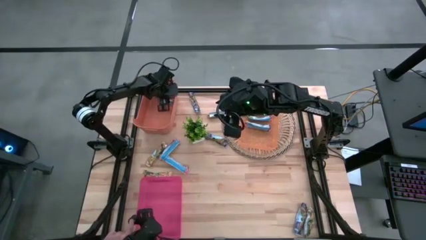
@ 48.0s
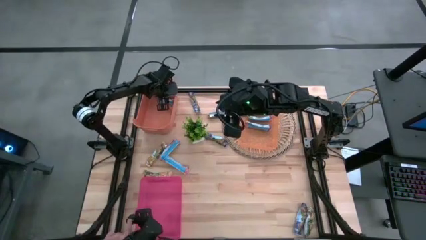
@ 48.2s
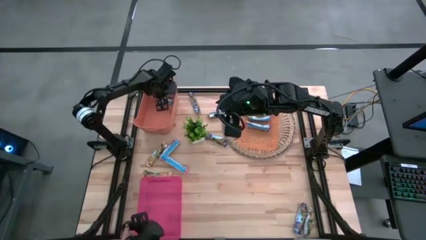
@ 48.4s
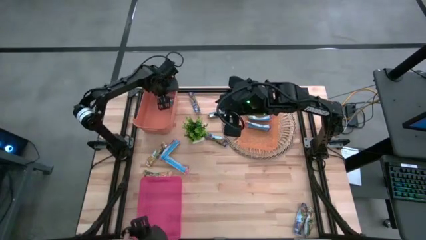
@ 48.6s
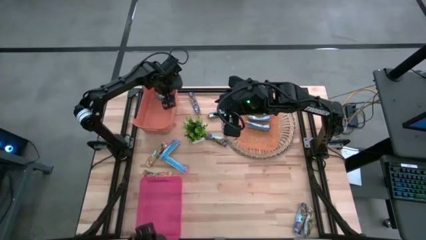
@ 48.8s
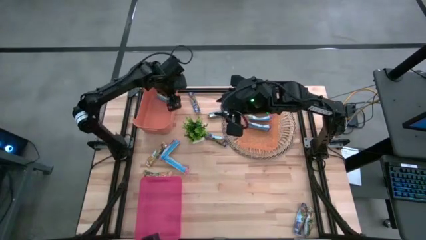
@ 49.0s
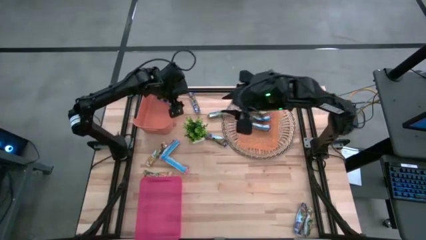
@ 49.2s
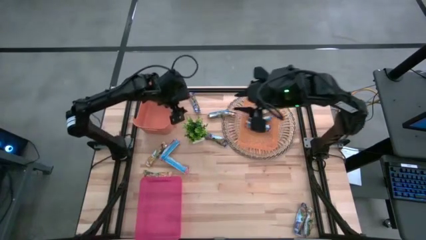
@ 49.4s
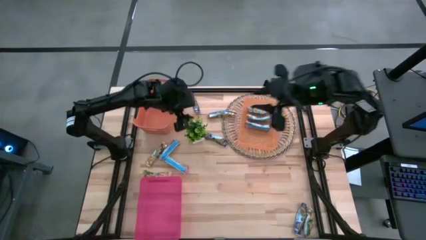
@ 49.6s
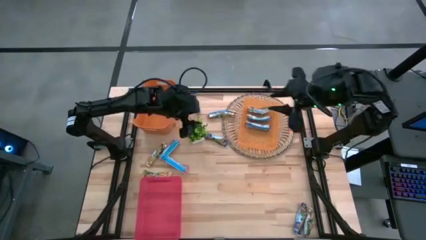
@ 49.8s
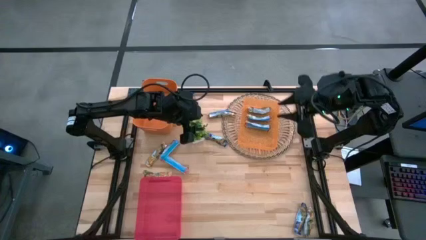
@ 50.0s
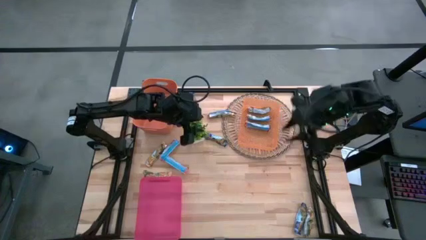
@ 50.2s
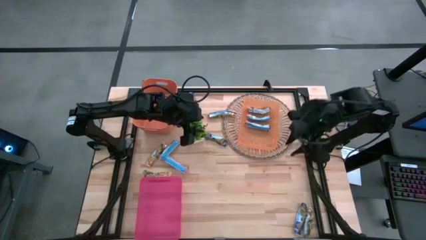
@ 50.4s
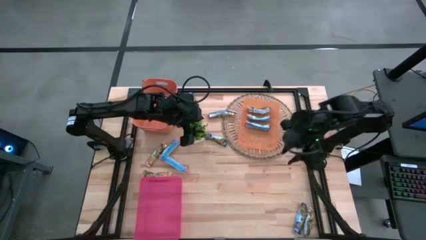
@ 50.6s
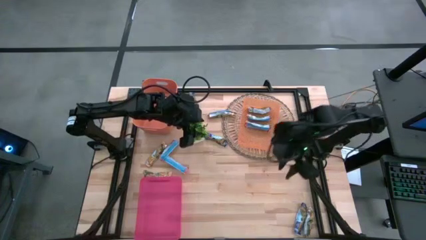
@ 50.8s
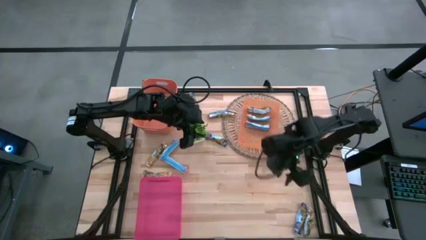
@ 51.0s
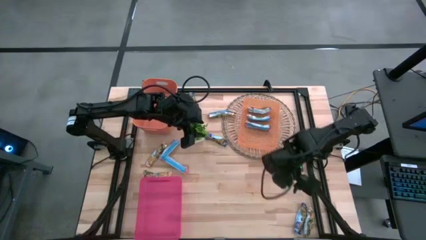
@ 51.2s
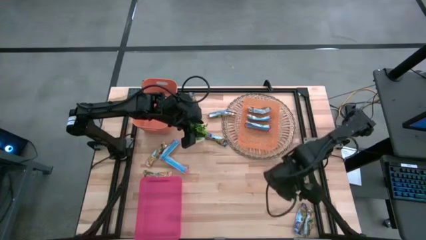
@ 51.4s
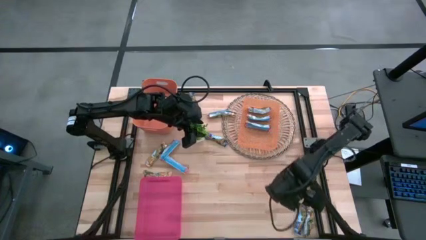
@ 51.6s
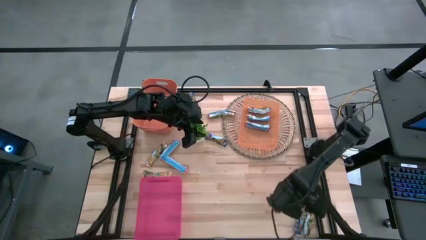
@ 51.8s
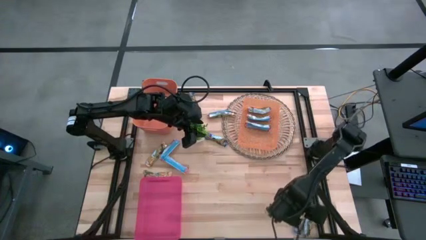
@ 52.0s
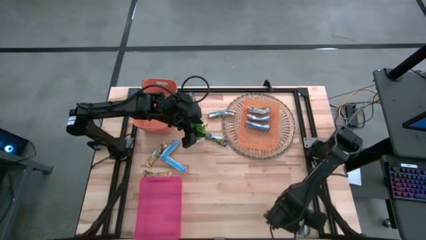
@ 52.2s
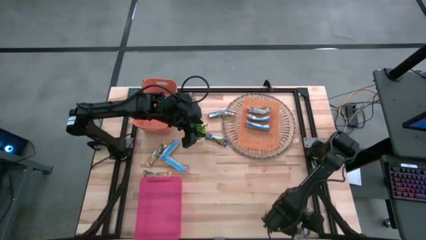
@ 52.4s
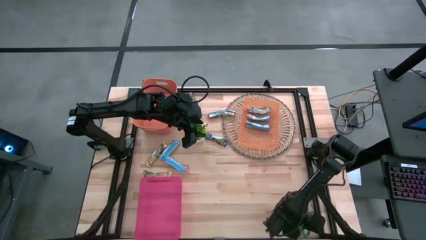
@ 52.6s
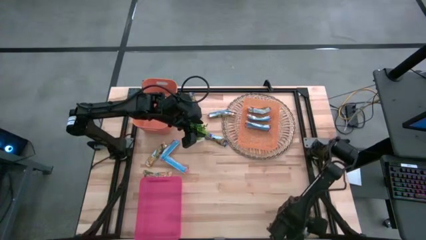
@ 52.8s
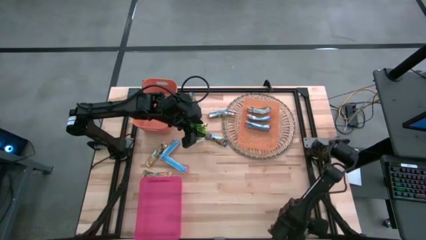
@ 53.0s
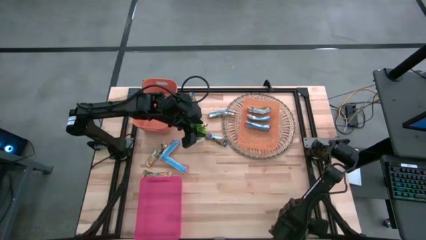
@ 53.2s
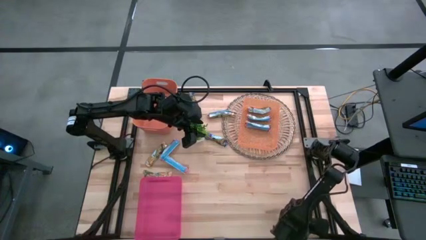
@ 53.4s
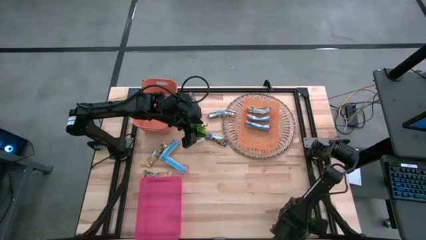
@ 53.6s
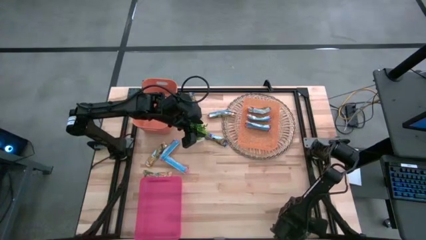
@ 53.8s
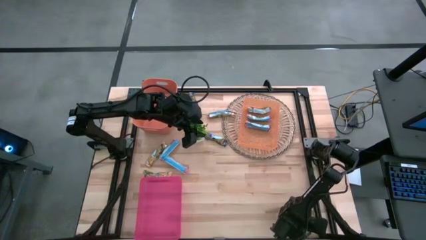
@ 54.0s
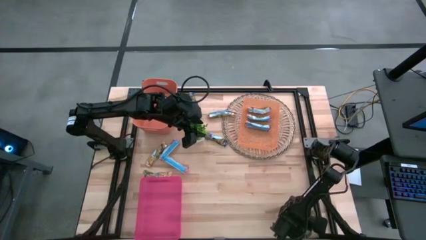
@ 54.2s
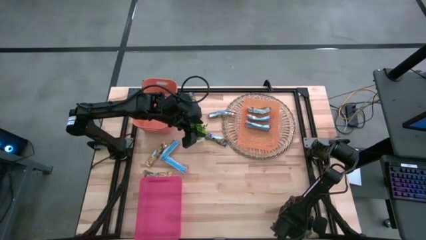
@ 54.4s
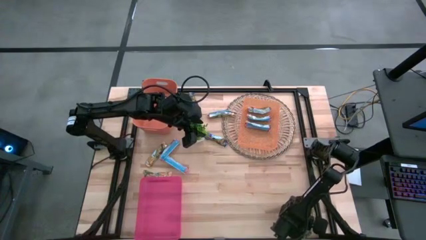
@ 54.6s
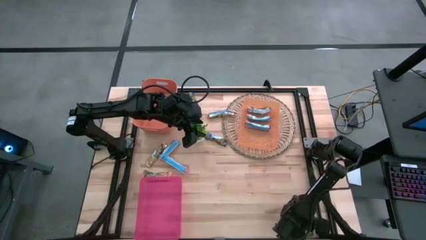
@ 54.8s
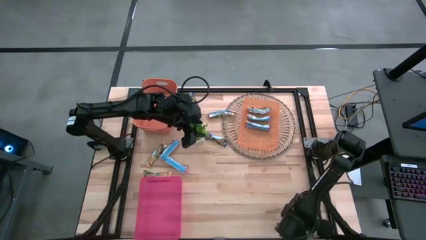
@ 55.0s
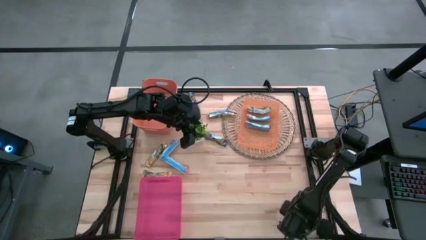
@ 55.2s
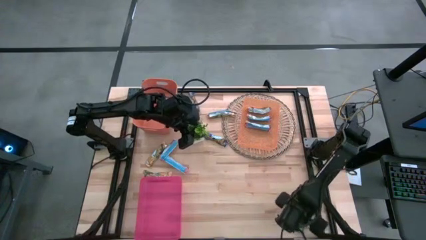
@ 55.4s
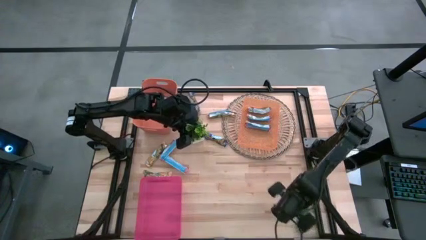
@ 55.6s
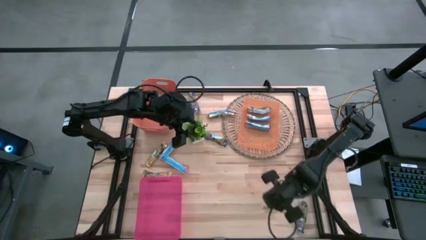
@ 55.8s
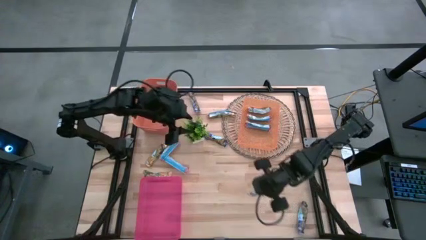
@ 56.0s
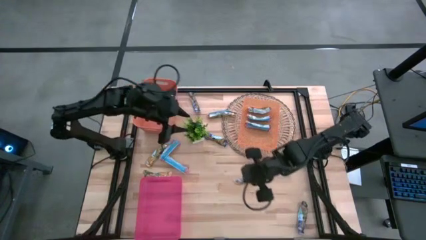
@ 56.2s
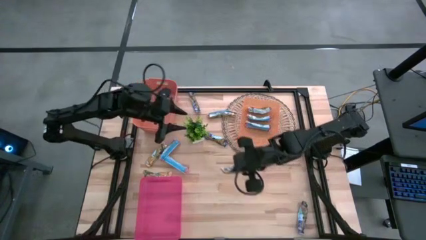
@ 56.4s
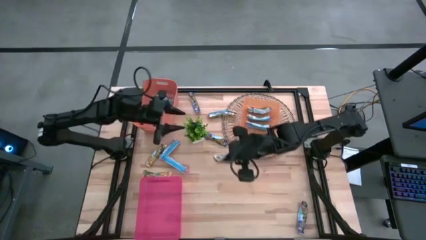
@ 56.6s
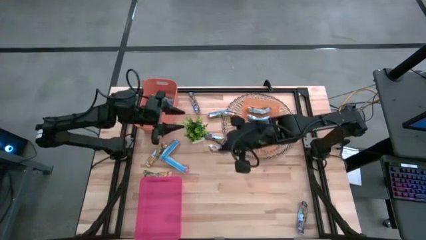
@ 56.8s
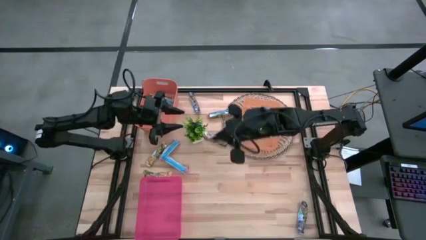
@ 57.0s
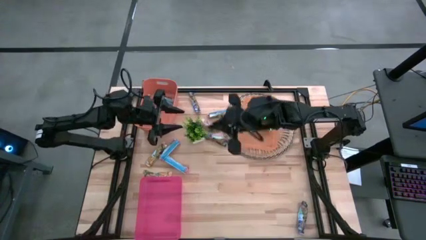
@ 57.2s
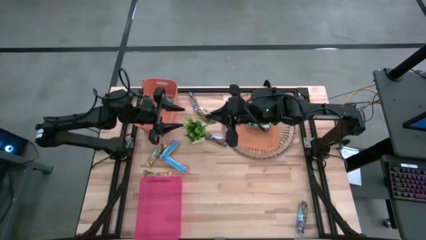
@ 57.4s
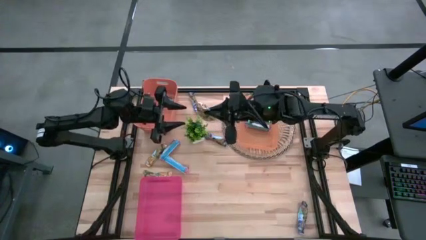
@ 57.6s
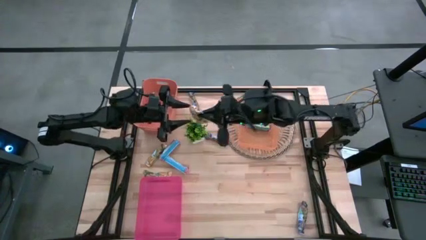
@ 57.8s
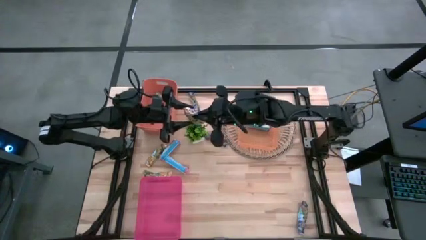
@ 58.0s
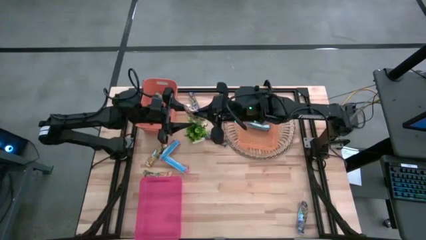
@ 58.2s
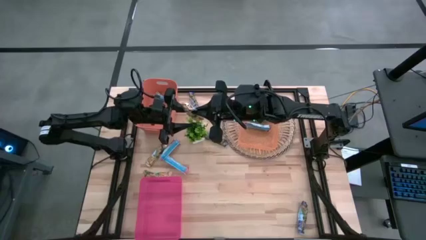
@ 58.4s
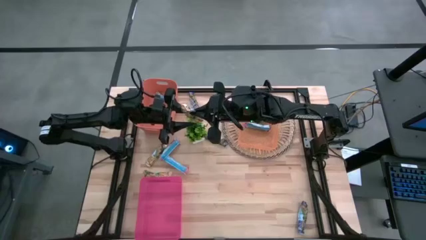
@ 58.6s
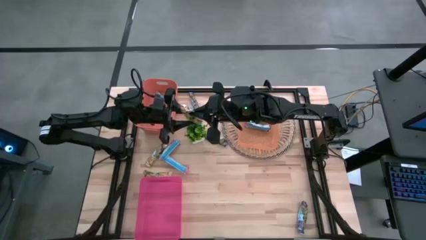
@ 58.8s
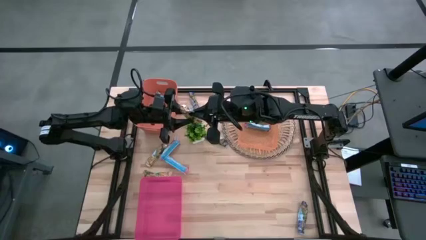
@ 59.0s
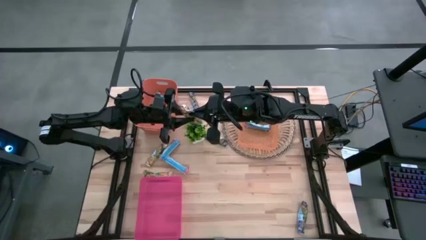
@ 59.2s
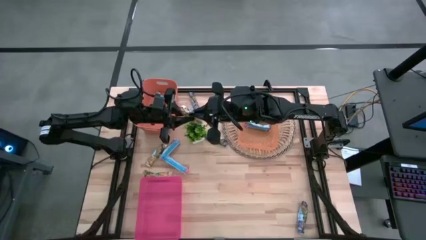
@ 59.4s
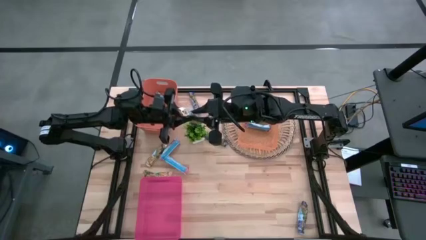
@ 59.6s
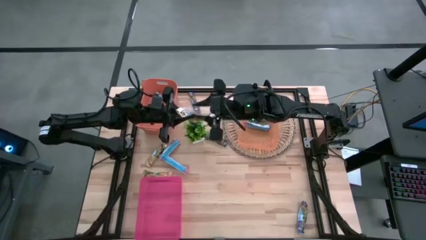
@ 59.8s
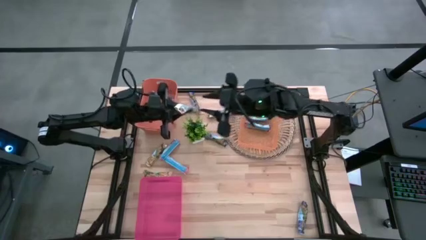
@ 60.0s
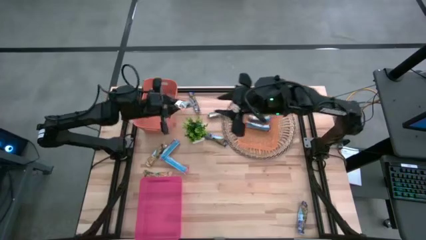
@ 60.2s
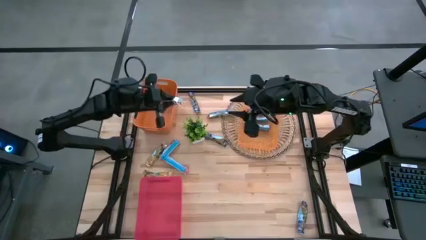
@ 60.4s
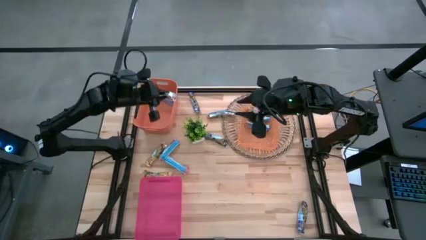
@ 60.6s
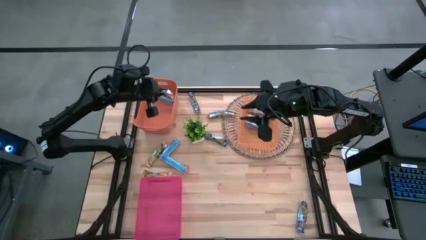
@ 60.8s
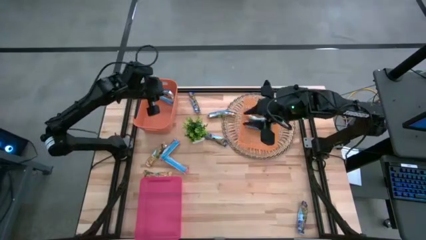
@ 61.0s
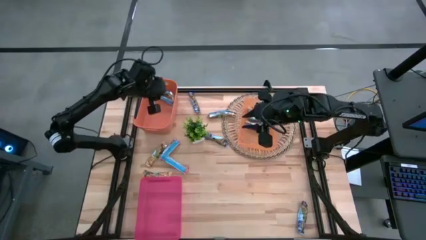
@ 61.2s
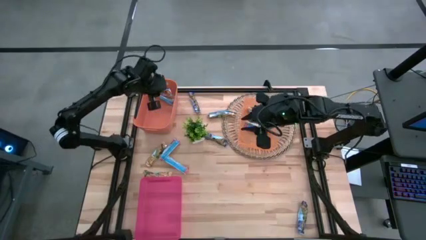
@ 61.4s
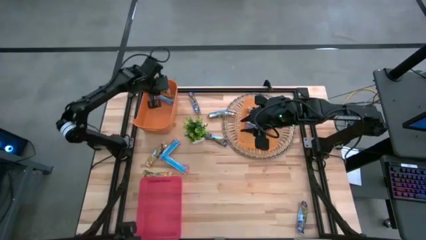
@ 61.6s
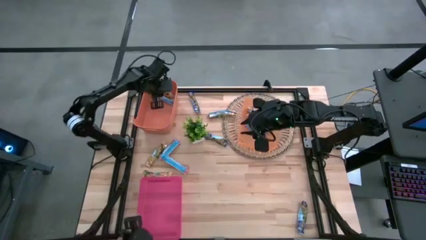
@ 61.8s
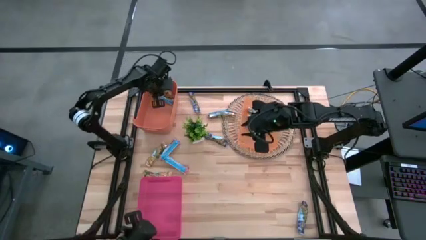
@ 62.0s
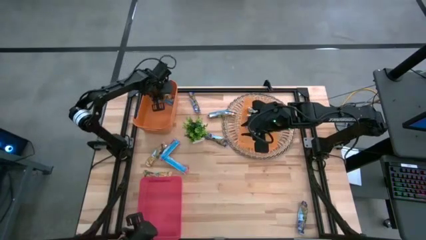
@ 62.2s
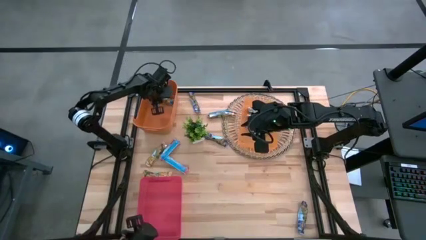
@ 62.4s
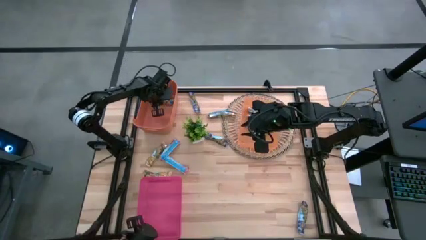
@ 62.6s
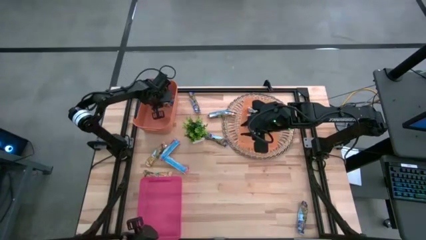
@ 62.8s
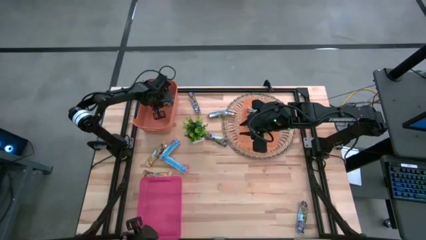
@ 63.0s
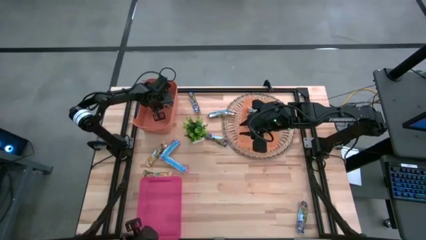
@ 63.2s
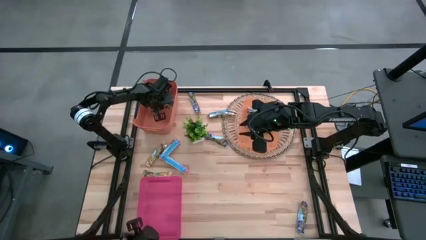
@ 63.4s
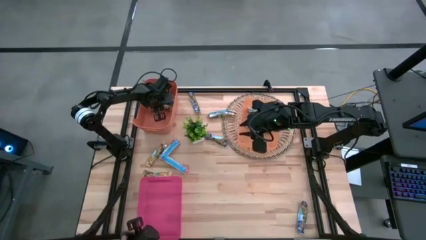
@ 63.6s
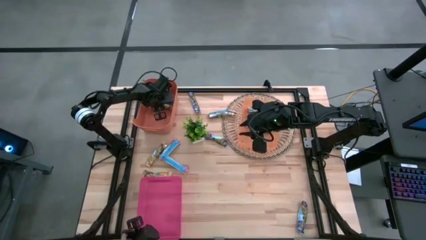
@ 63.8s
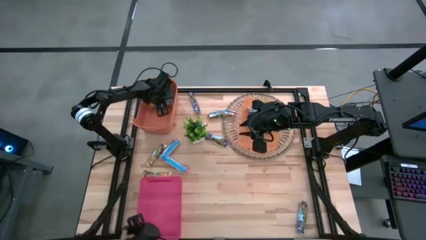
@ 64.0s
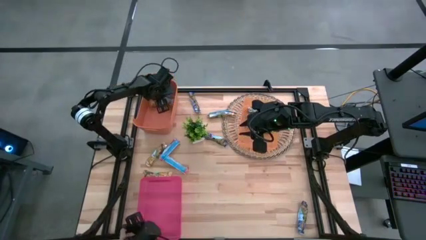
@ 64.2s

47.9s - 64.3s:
Task: Pick and place Granola Bars by type
Put the yellow granola bar into the left orange bin
